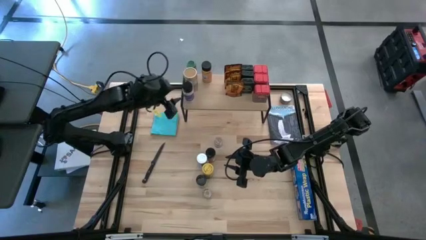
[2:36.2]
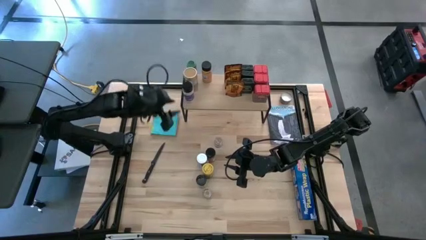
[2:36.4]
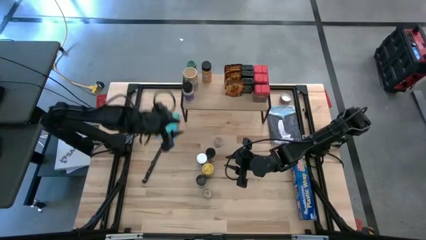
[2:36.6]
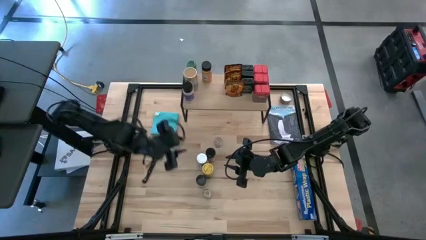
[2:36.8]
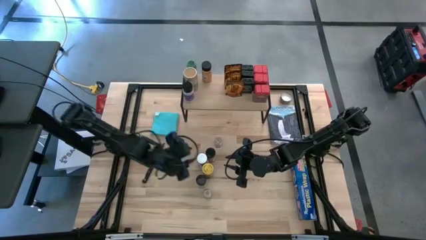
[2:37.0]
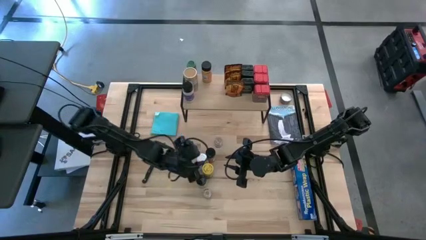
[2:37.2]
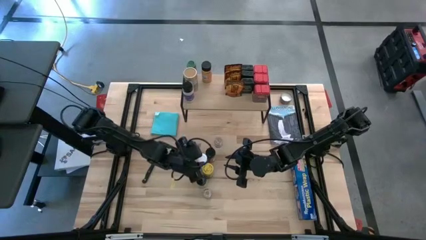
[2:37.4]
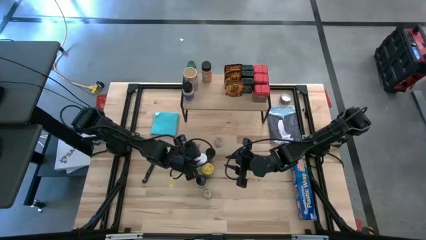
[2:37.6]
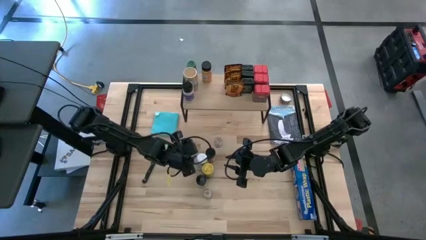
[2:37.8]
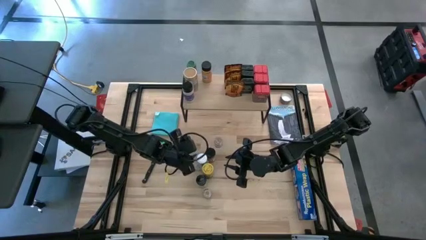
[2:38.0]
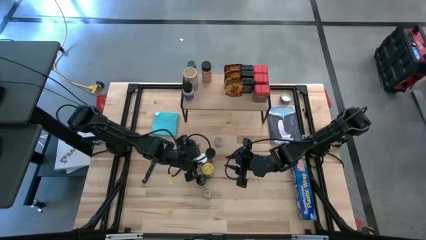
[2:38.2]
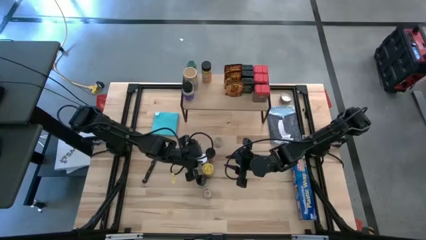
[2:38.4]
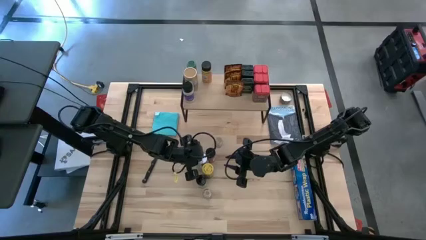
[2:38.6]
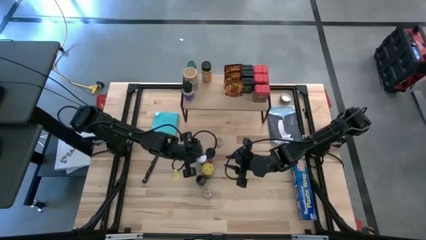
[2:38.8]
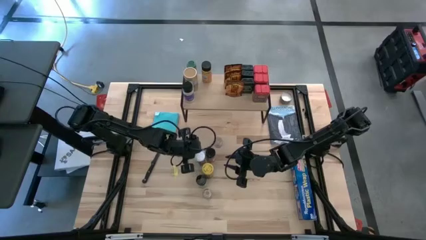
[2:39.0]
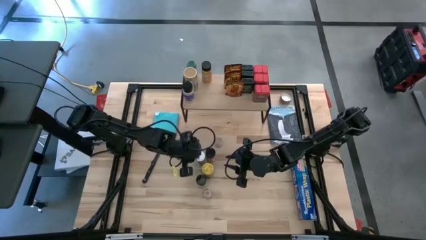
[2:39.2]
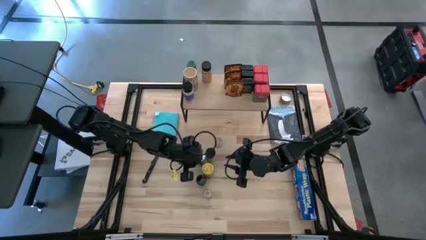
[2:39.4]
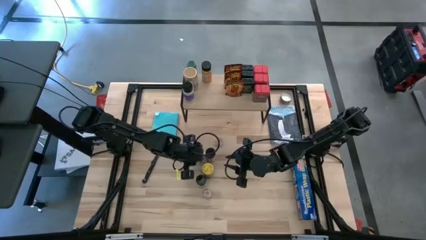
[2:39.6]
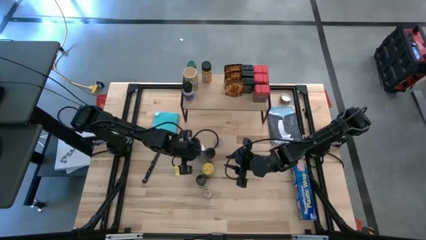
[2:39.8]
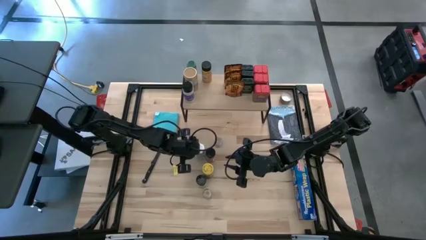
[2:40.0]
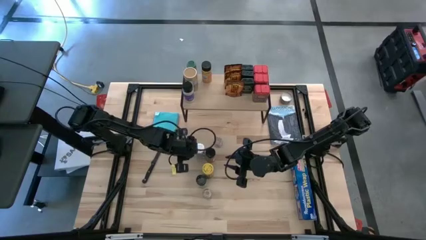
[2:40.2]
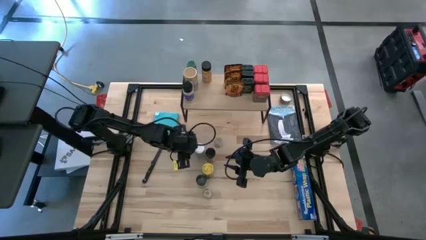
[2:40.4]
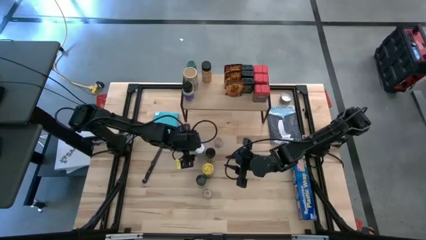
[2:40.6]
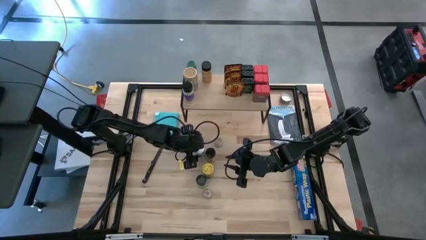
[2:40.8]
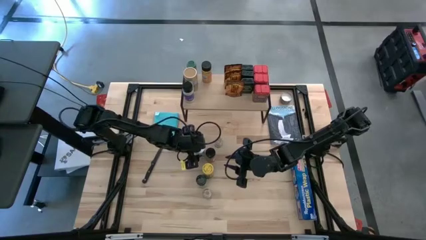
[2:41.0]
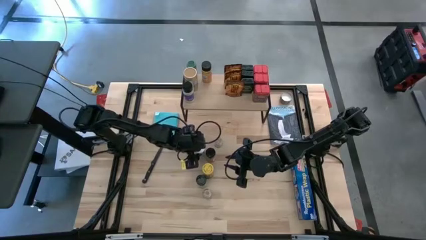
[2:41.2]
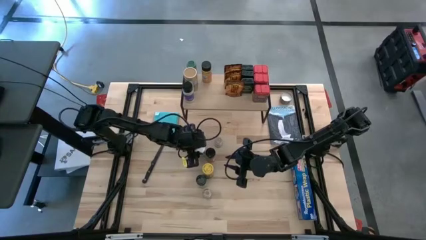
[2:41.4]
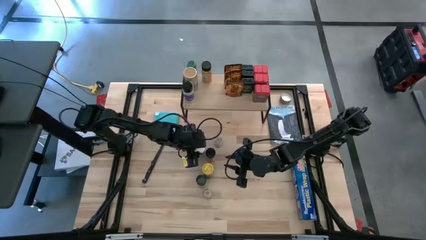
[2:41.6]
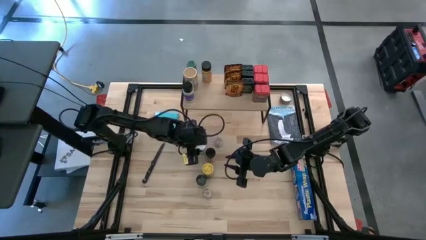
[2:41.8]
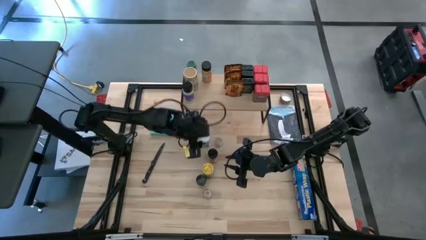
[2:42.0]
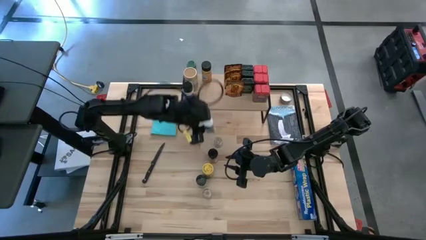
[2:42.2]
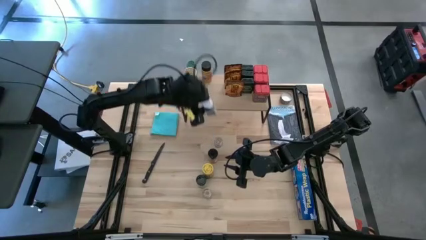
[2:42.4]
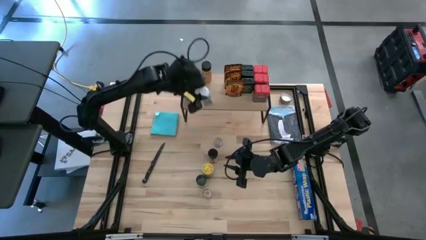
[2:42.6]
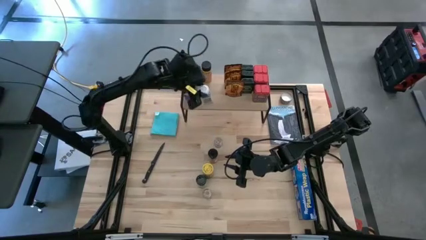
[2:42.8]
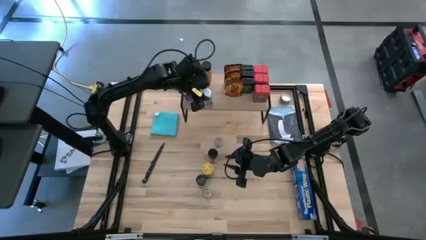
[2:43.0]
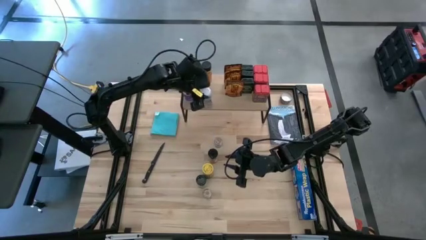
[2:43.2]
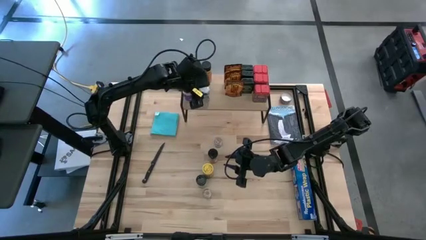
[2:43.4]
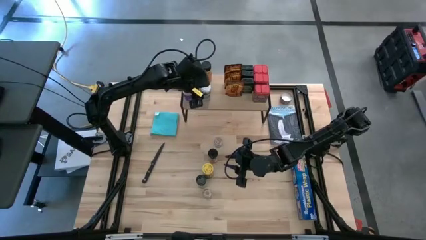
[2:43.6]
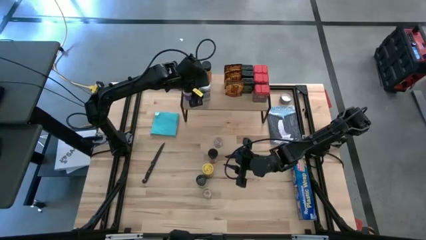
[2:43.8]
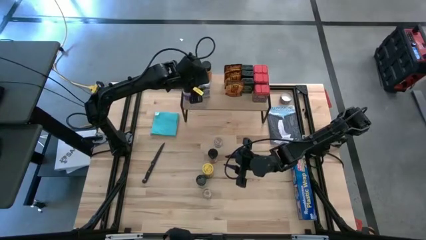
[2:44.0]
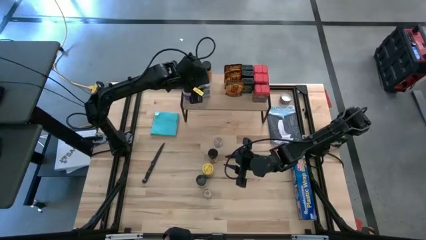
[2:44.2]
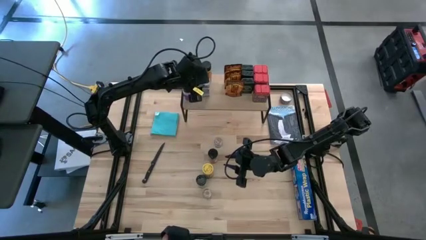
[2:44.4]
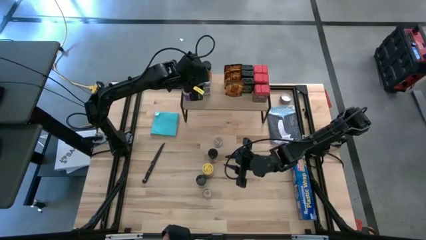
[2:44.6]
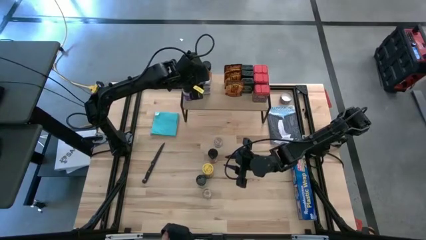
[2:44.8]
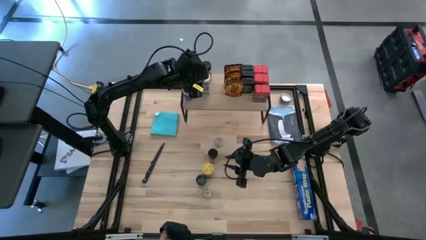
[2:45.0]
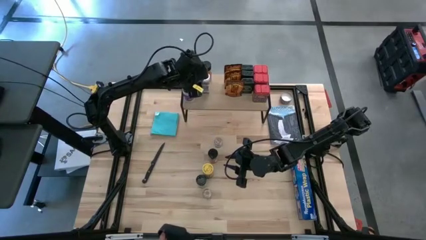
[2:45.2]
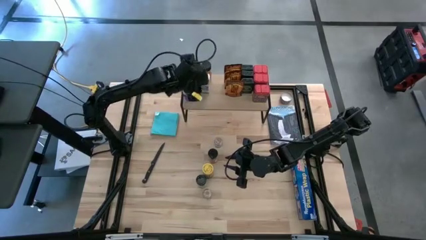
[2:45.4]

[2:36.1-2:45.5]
Task: Shelf spices
Put the white seasoning bottle on the shelf

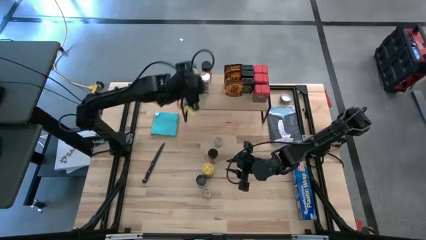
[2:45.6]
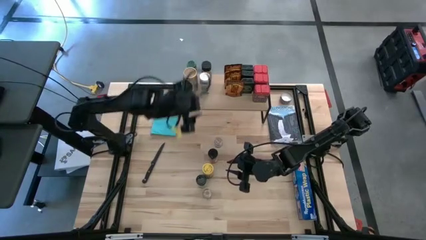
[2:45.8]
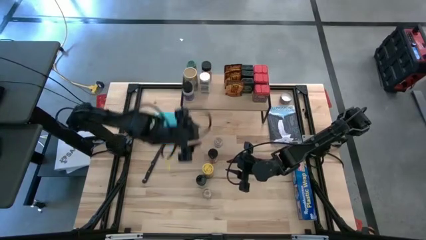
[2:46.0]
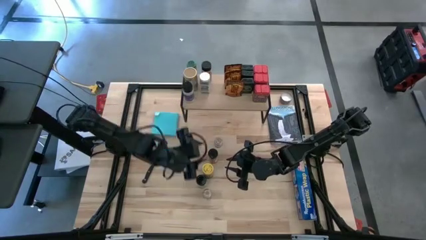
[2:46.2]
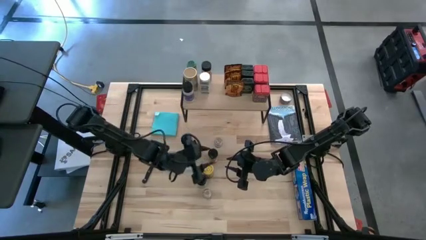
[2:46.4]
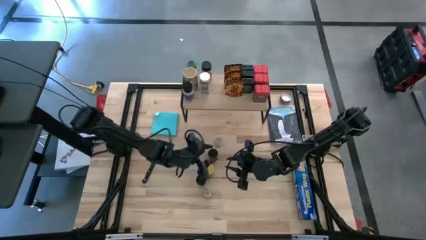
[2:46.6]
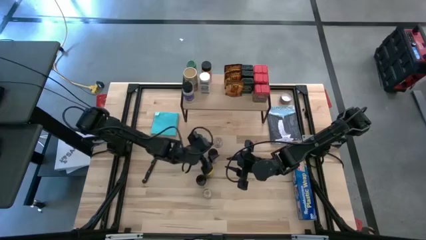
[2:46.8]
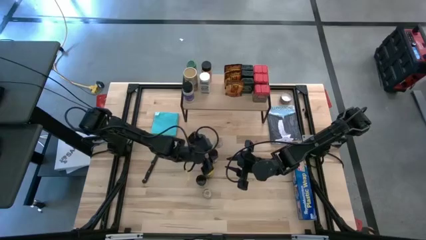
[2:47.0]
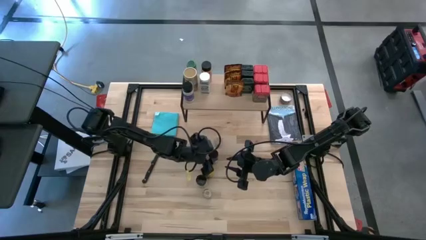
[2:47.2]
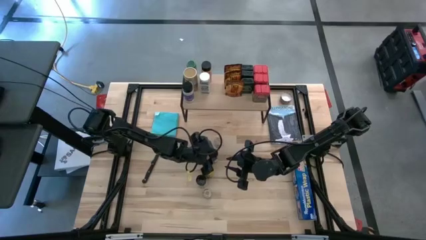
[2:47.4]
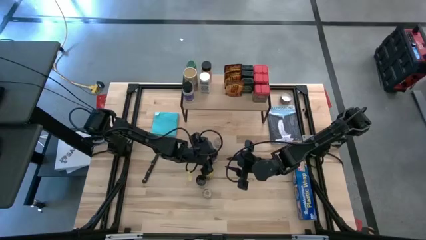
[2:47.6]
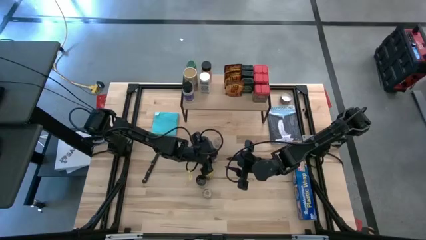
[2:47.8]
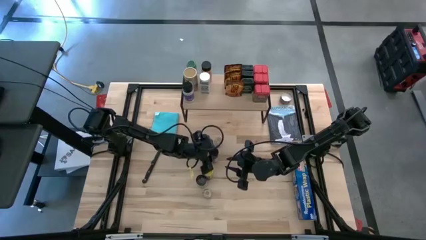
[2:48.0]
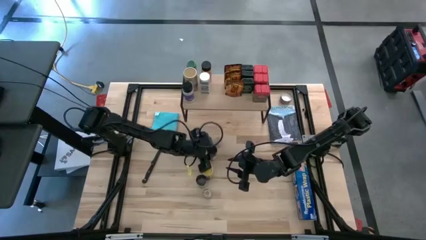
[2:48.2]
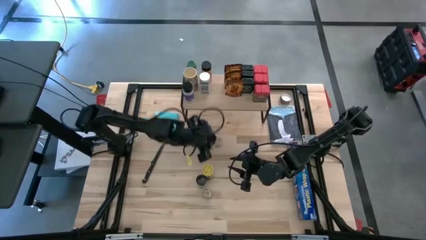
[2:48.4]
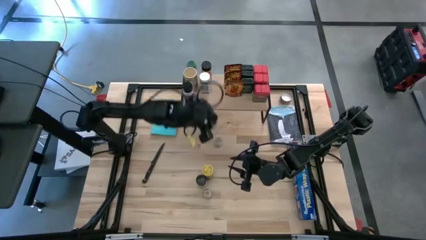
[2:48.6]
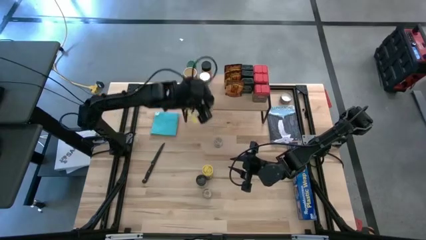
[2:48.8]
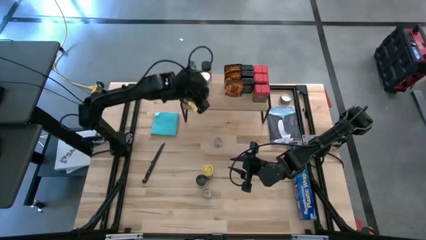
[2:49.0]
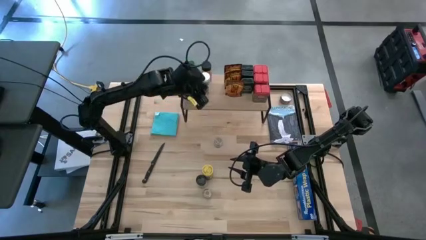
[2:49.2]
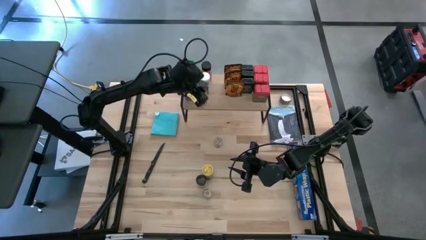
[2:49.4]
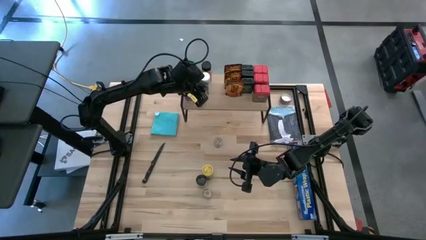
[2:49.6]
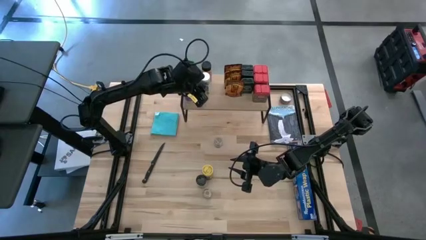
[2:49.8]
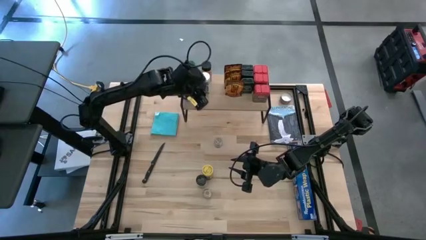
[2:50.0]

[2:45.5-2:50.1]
Put the black seasoning bottle on the shelf

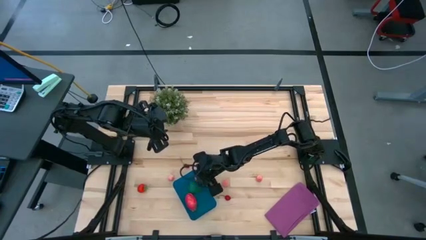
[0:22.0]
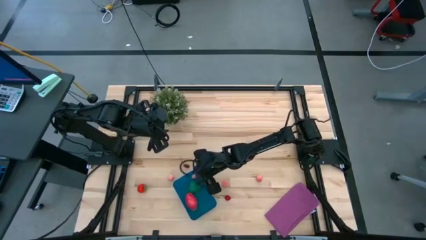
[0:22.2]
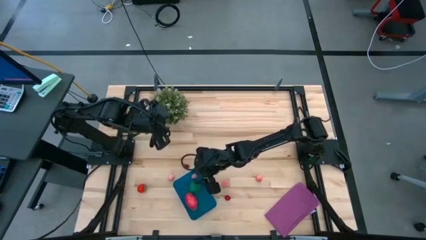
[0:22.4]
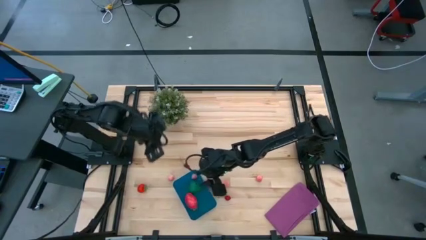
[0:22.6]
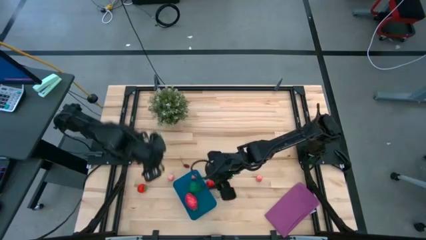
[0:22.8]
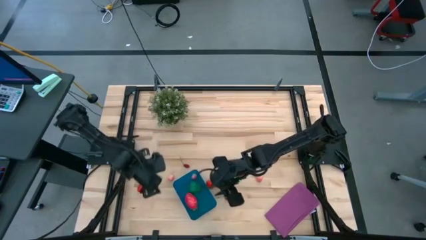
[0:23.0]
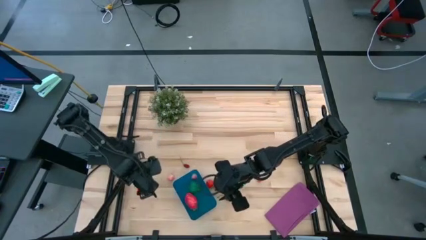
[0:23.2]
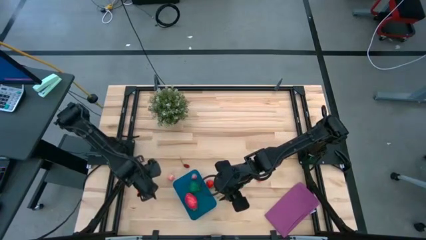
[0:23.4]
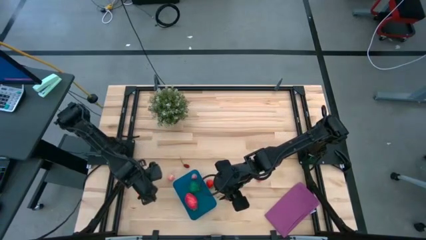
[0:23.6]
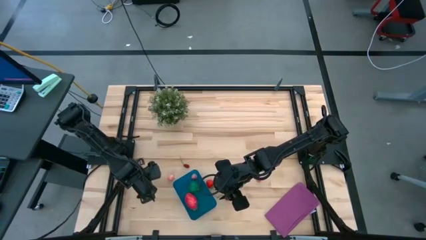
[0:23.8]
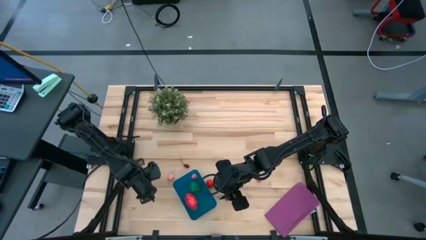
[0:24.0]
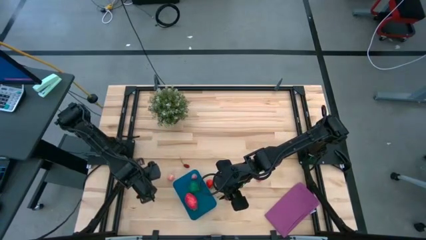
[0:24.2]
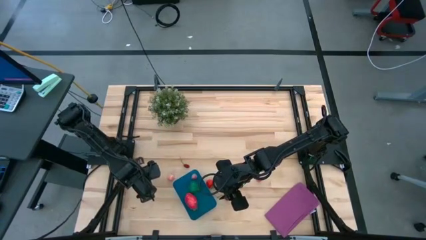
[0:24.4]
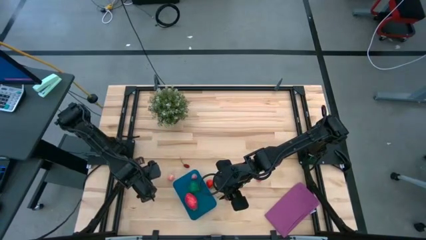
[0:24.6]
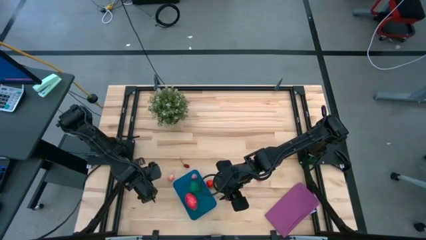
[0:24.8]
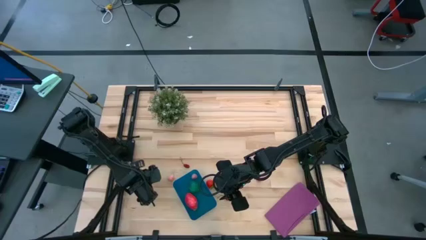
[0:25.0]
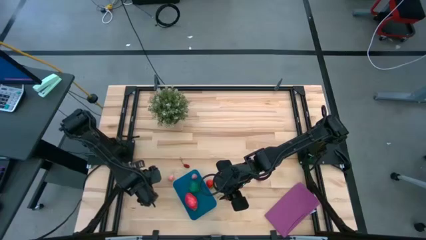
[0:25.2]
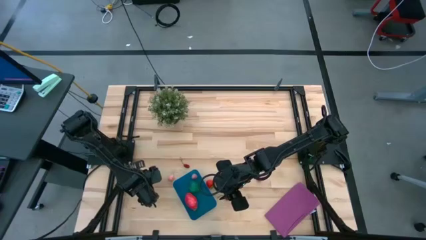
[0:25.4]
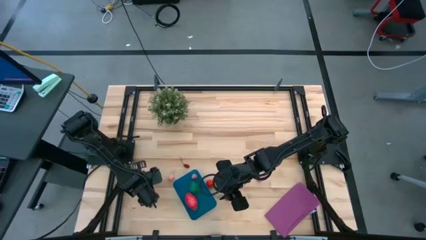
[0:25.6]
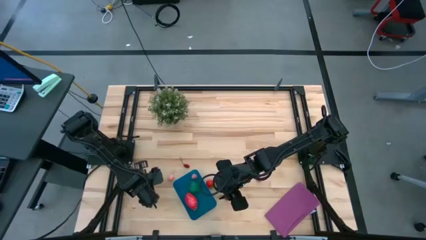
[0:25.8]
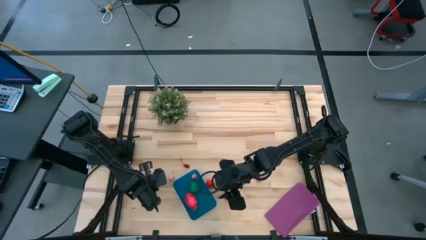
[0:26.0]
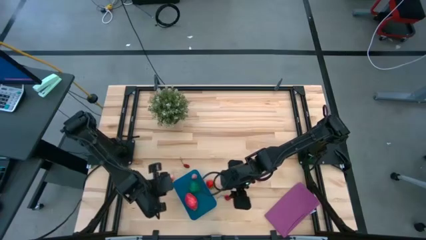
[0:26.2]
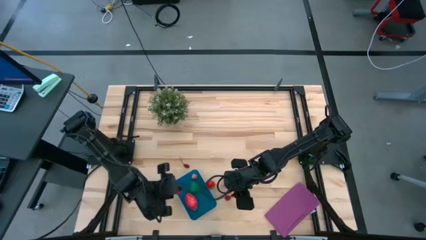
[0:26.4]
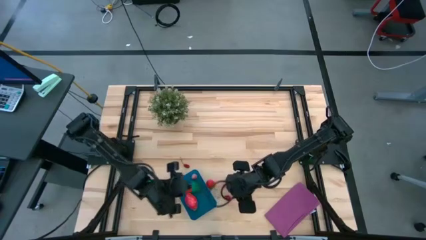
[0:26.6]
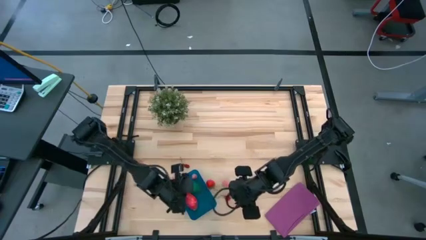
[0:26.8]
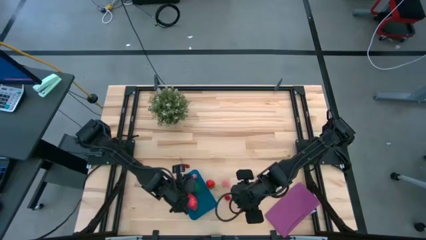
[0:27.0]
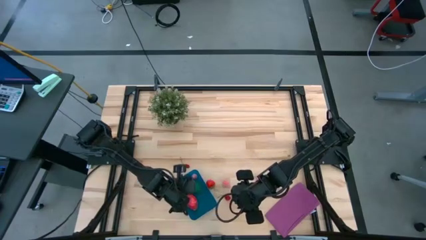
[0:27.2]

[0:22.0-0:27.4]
Task: Pick and placing Produce into tupperware
Put the red strawberry into the blue bin
